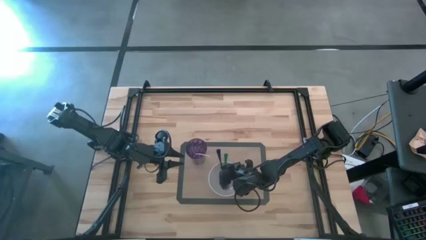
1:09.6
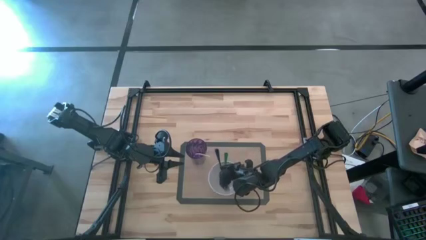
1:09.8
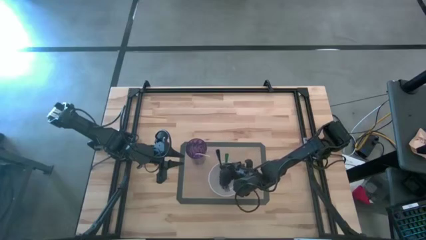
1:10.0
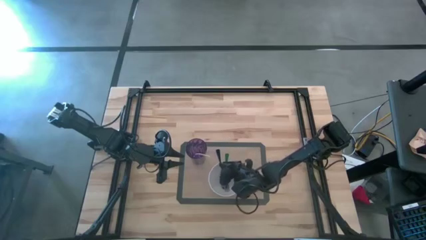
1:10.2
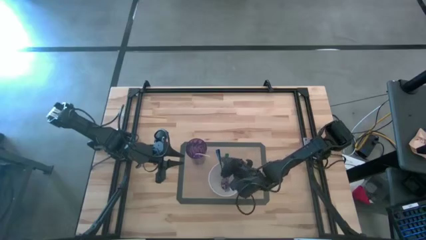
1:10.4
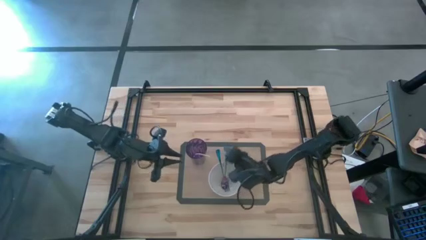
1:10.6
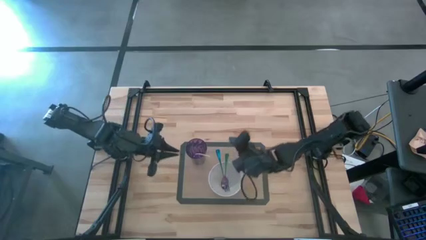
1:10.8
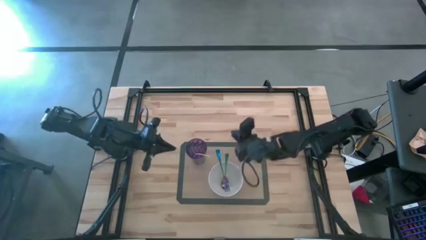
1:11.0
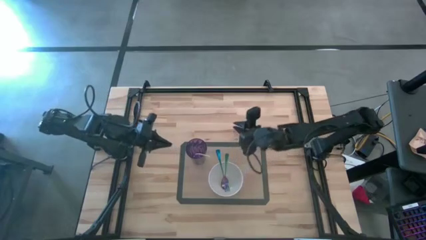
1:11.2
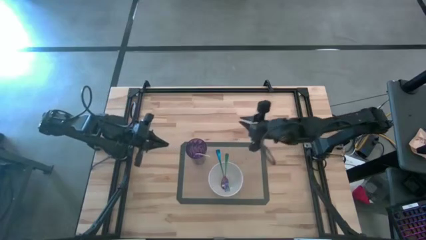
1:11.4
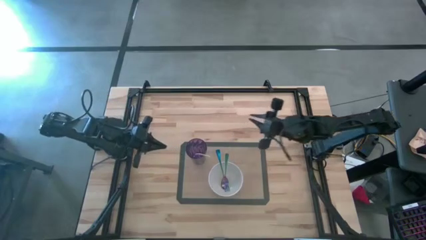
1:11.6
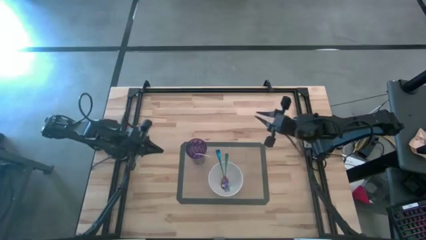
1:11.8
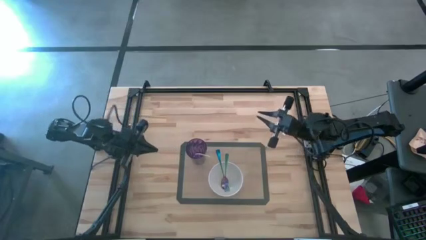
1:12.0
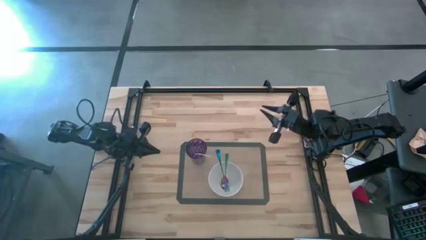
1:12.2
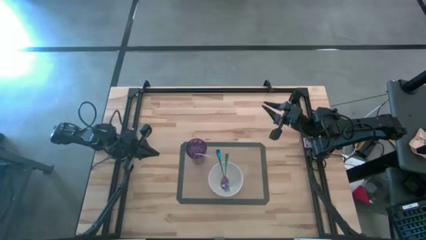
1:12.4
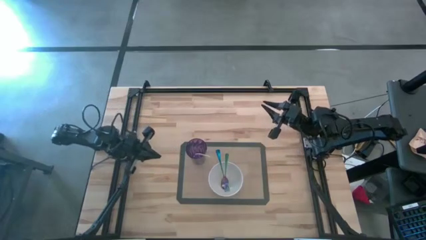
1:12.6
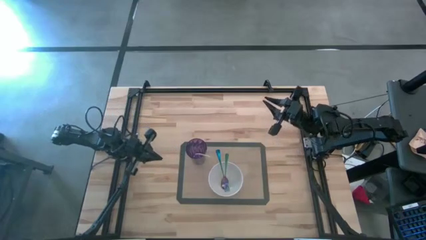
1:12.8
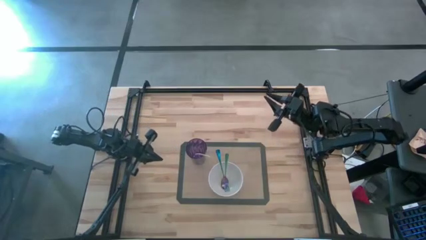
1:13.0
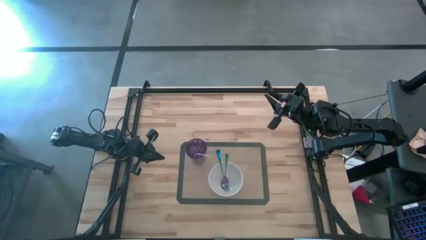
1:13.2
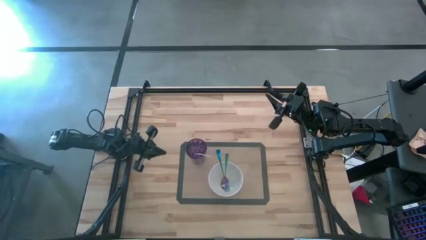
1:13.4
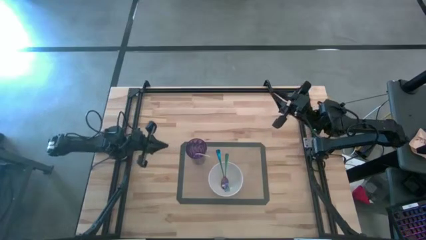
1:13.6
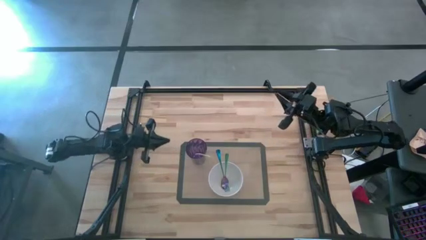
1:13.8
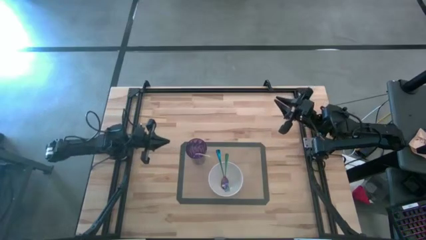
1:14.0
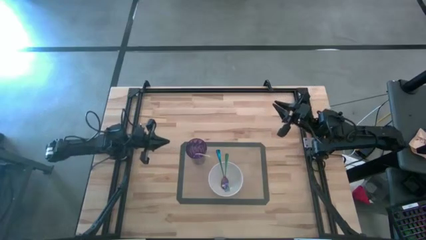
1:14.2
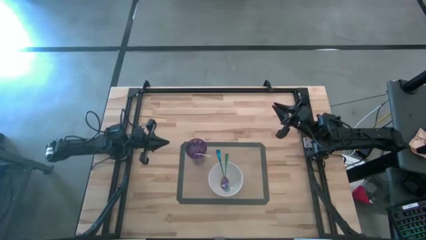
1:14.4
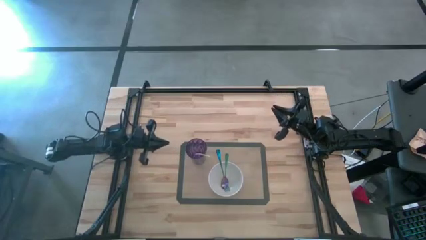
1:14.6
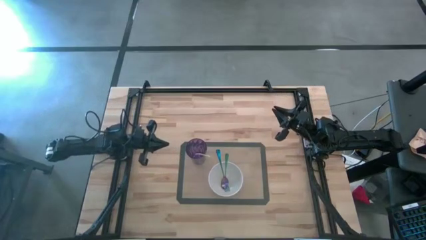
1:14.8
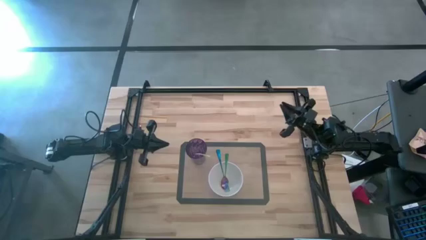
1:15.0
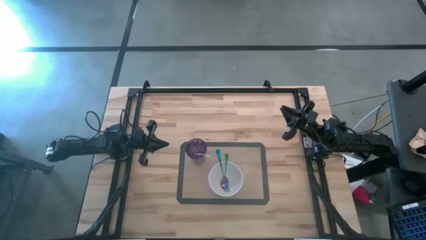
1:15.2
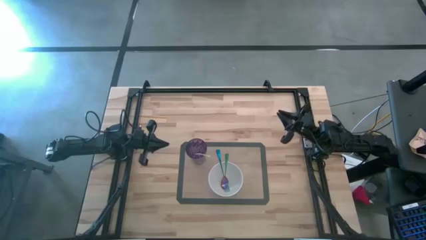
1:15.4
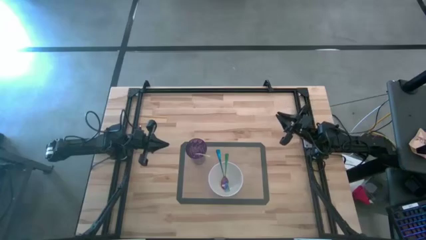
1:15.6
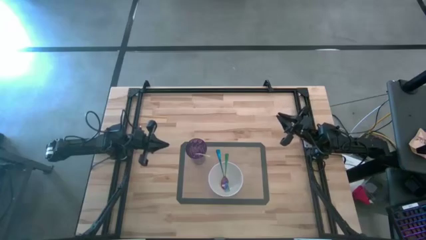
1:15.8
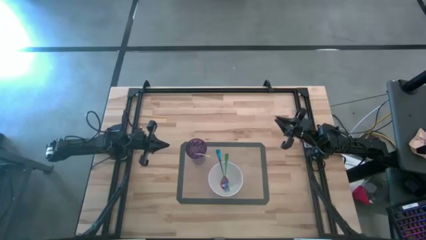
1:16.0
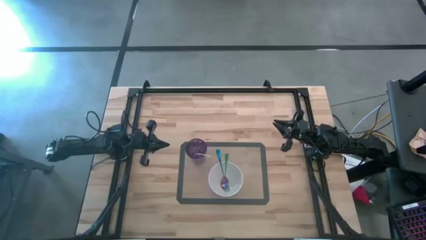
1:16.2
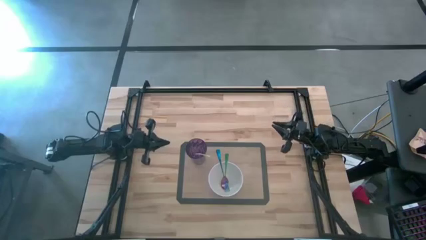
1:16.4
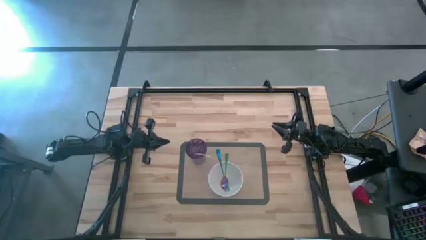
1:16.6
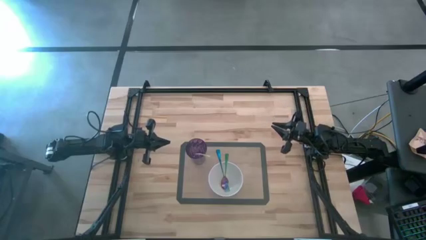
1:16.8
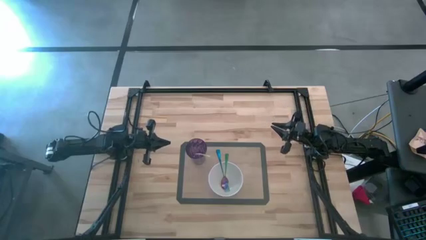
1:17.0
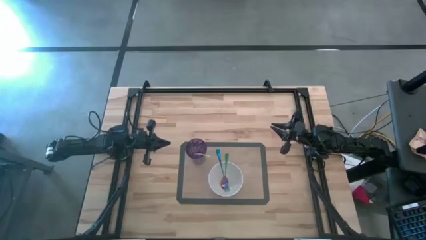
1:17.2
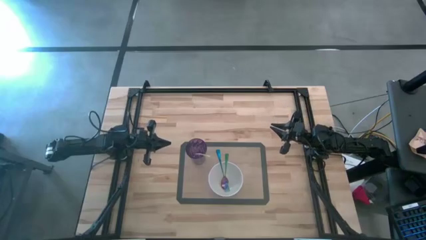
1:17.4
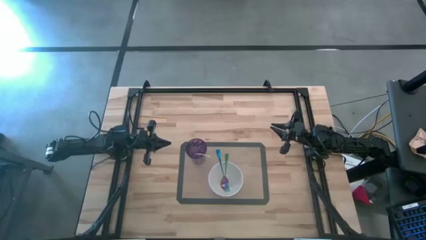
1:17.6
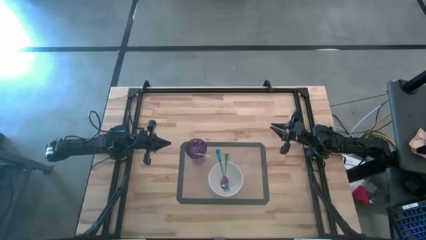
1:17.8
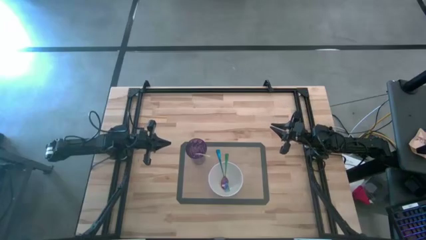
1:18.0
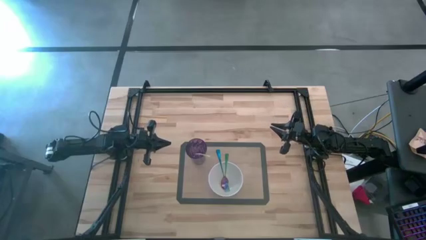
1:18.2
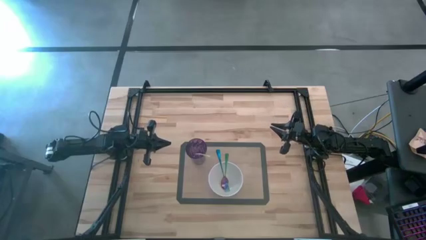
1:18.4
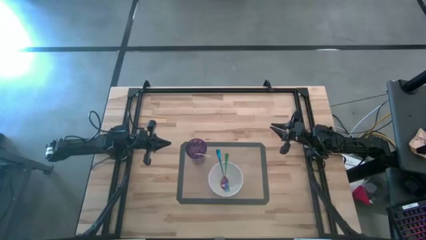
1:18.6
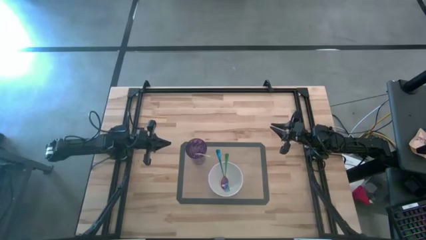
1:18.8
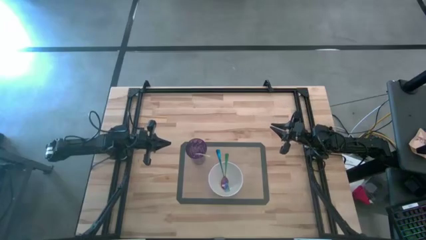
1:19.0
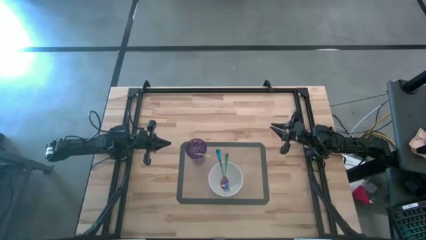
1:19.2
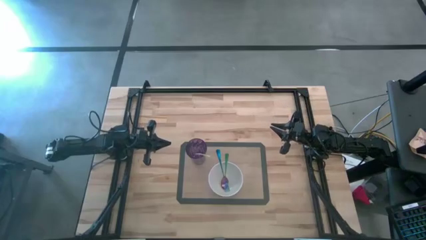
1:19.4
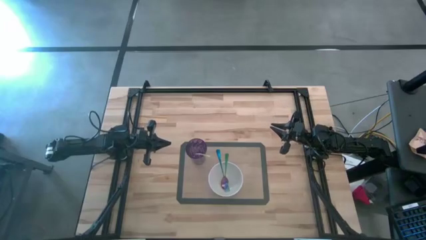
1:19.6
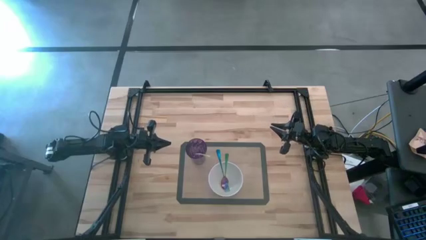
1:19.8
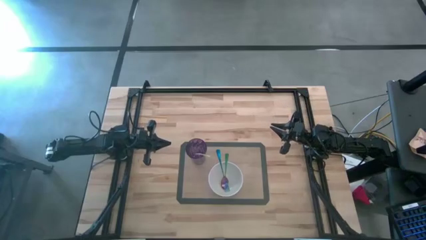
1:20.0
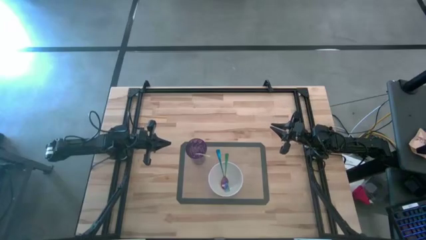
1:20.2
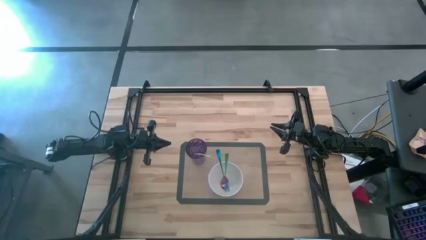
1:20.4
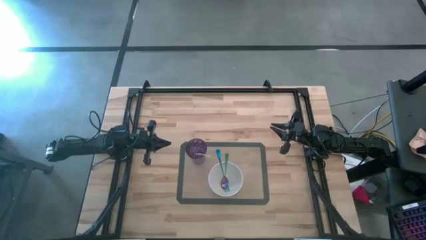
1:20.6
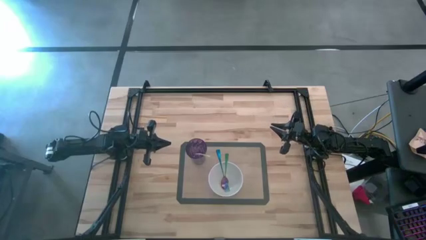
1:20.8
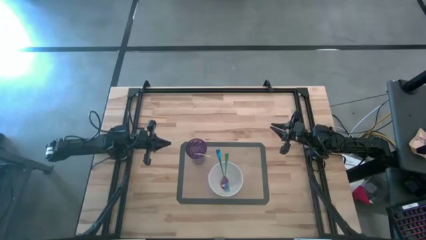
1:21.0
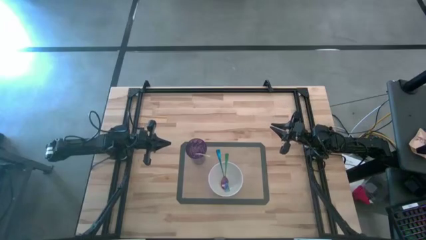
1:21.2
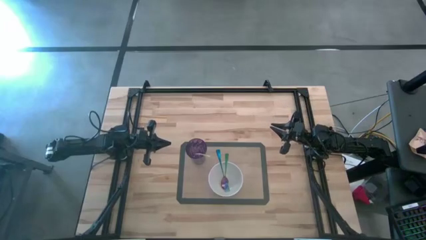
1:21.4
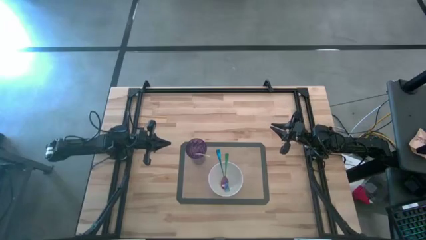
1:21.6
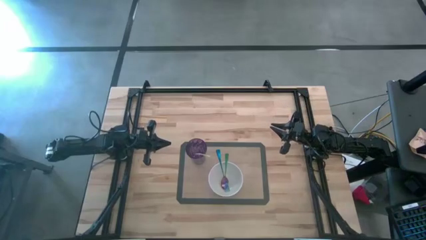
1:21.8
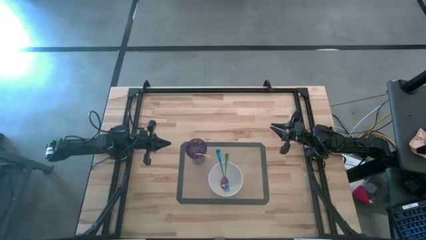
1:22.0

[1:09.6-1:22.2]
Task: Pick & Place Utensil
Return to Home Position

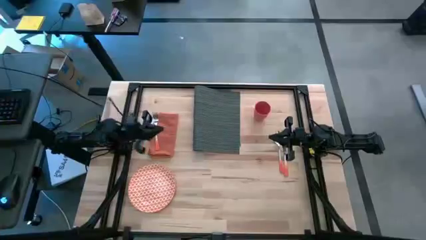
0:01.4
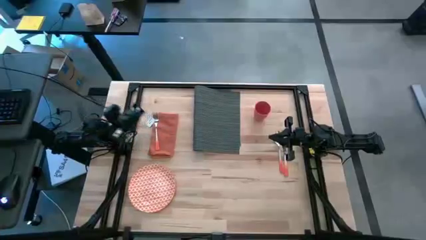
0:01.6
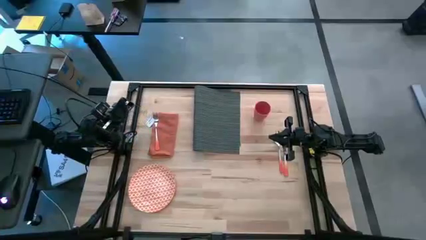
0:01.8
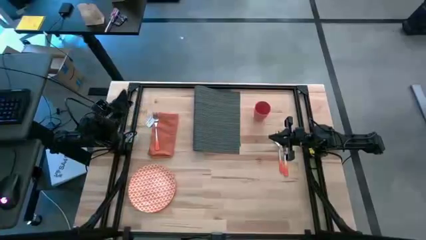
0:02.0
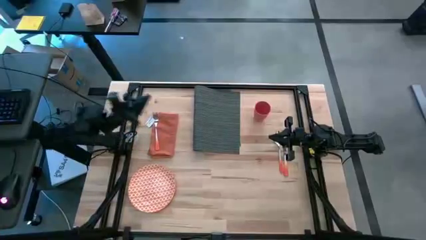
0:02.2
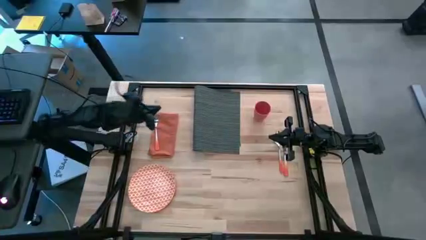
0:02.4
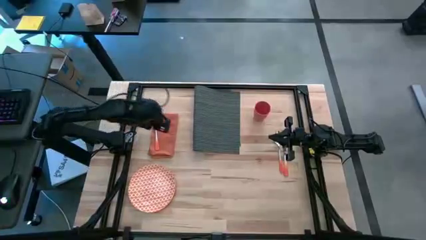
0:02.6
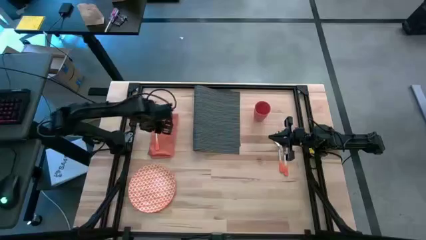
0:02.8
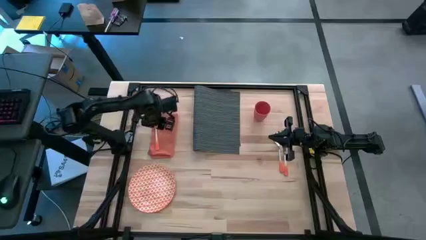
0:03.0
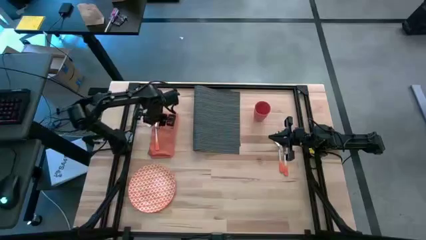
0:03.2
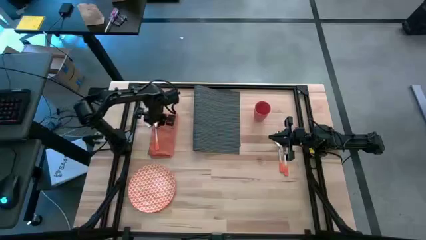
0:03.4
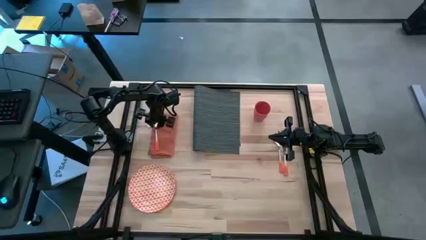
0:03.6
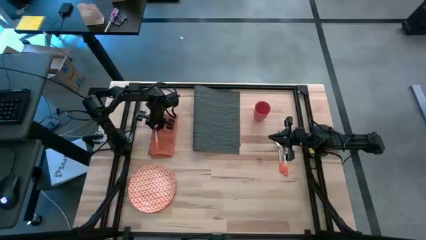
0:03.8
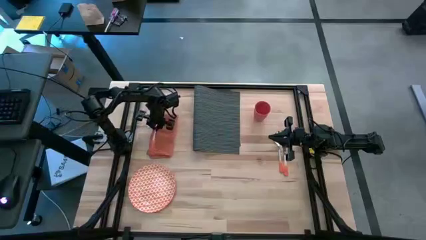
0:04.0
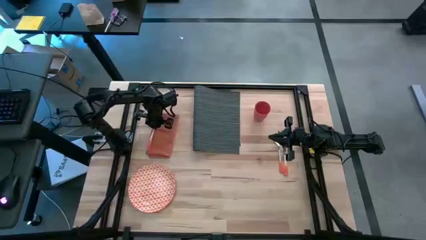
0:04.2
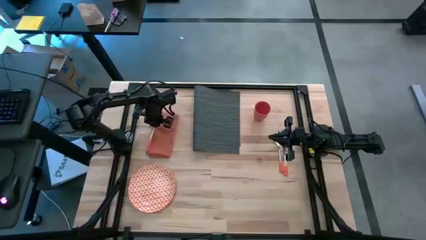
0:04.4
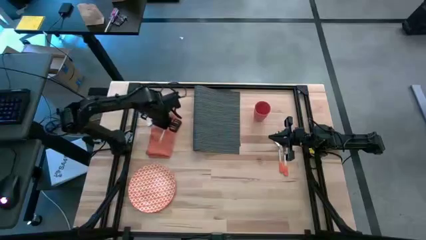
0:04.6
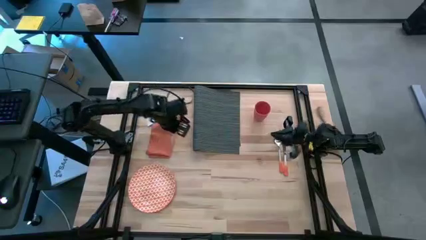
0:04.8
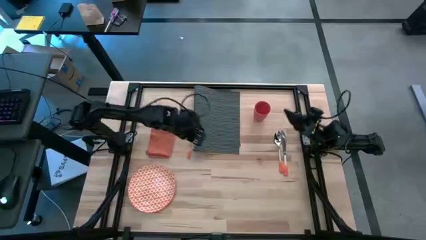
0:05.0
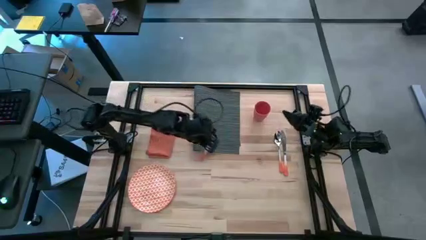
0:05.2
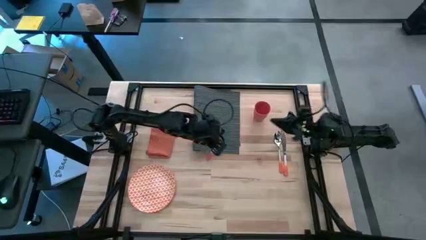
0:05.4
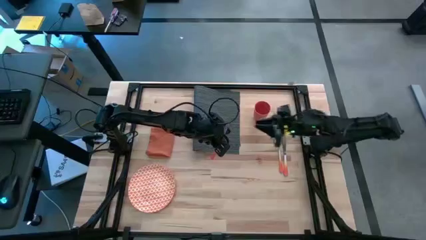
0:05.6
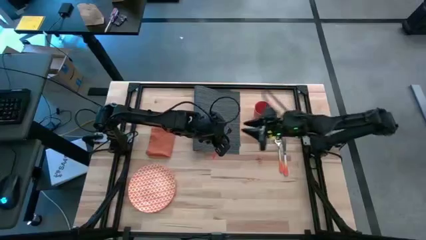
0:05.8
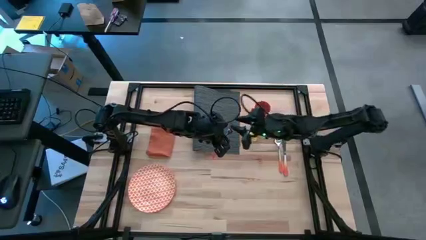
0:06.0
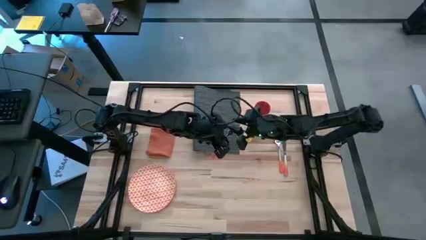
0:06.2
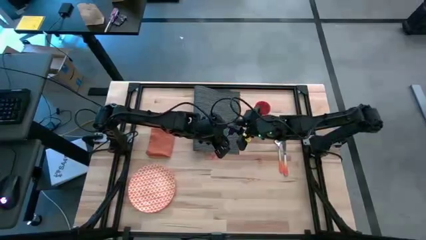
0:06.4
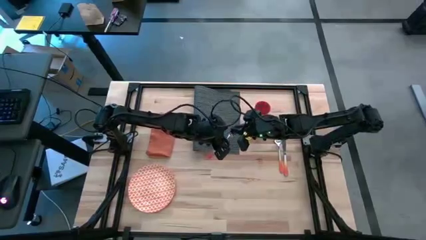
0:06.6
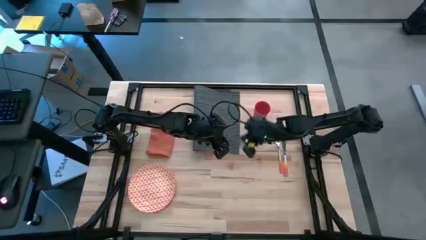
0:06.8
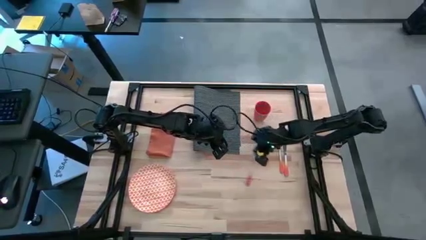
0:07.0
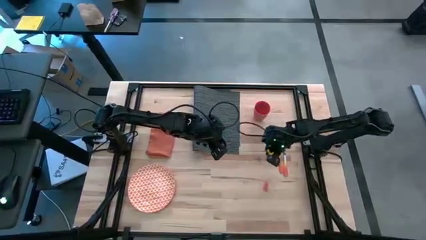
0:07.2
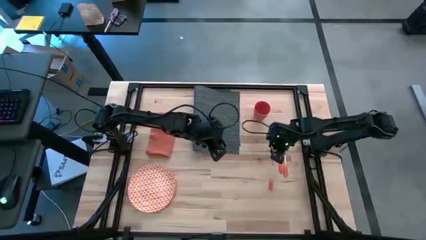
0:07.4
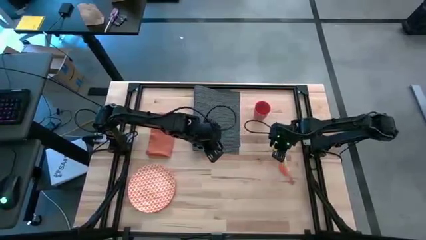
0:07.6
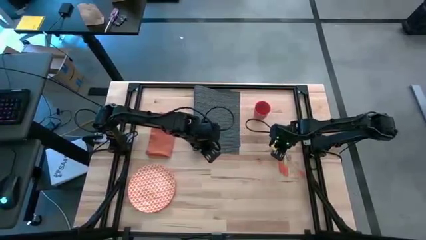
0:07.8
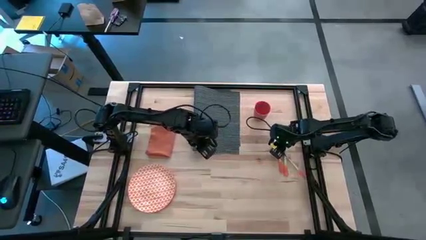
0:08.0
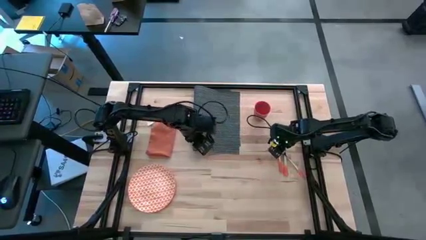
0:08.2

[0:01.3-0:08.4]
Task: Set table place
Put the orange fork to the middle right of the table
